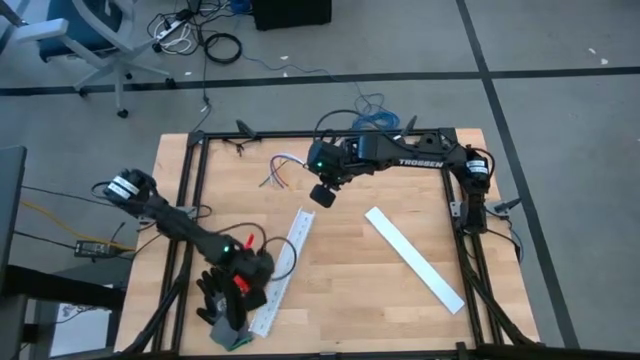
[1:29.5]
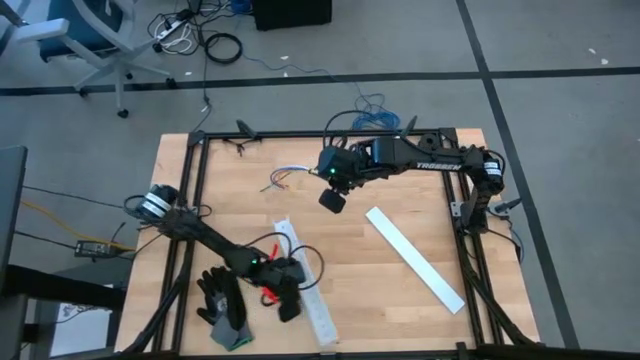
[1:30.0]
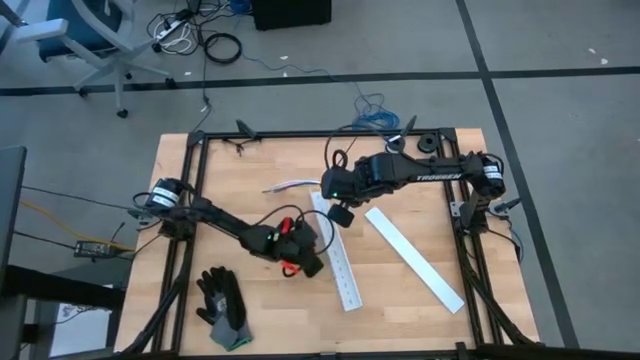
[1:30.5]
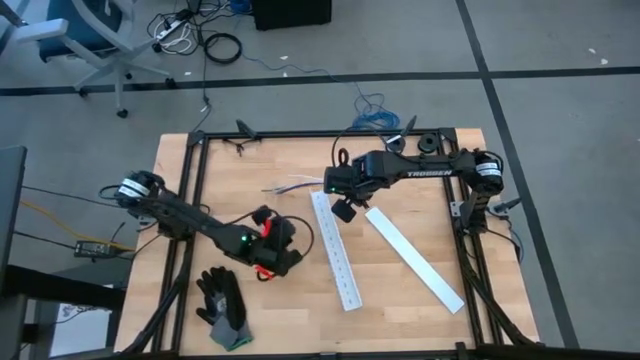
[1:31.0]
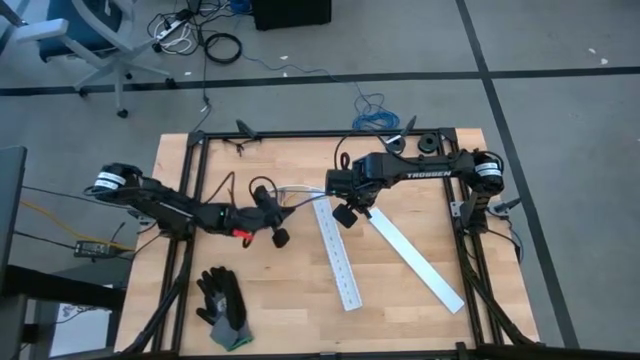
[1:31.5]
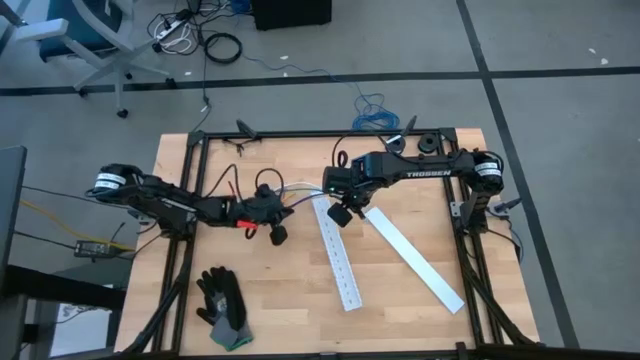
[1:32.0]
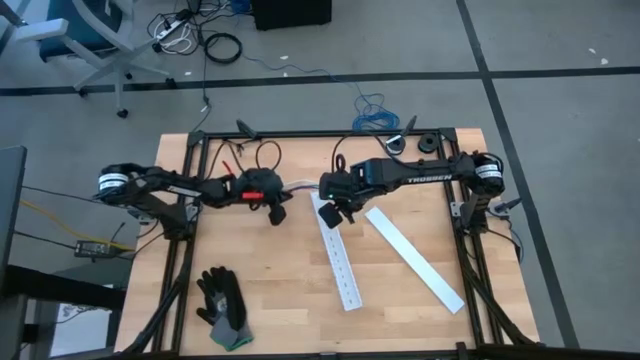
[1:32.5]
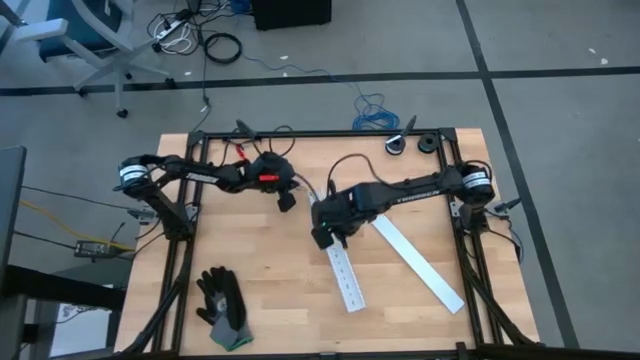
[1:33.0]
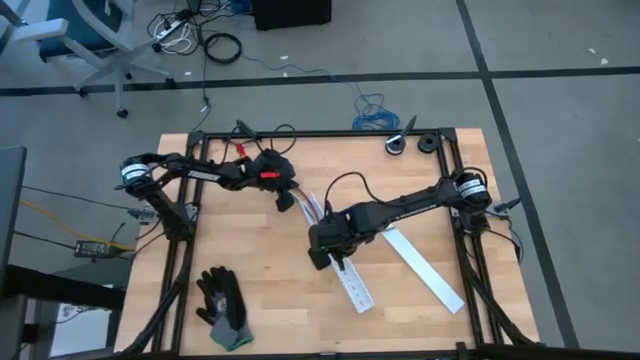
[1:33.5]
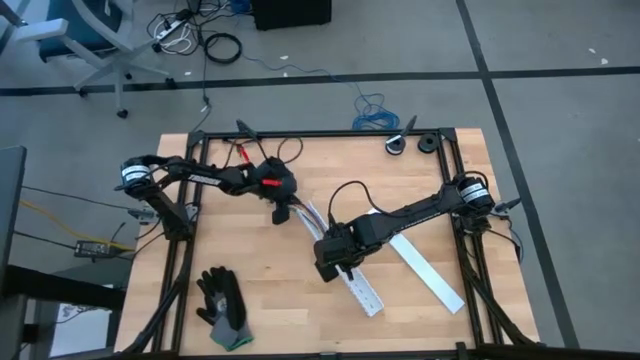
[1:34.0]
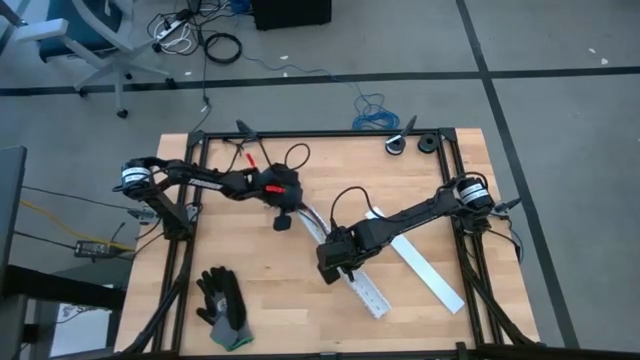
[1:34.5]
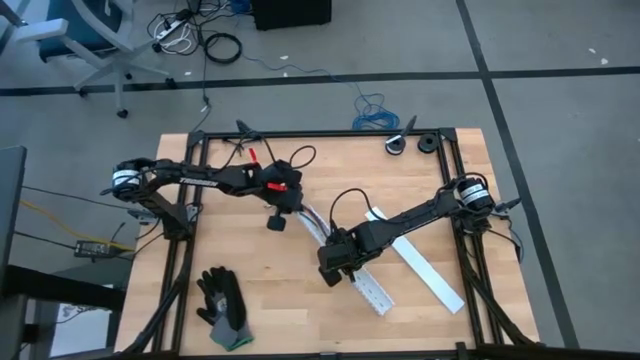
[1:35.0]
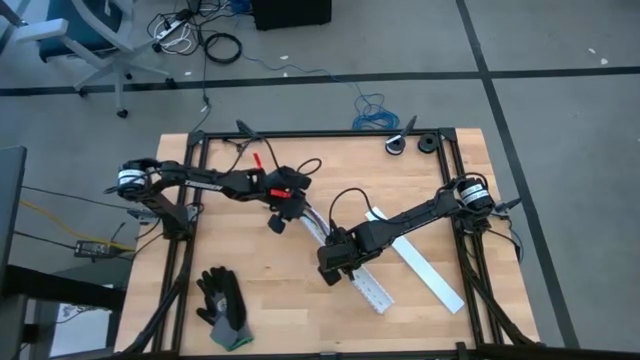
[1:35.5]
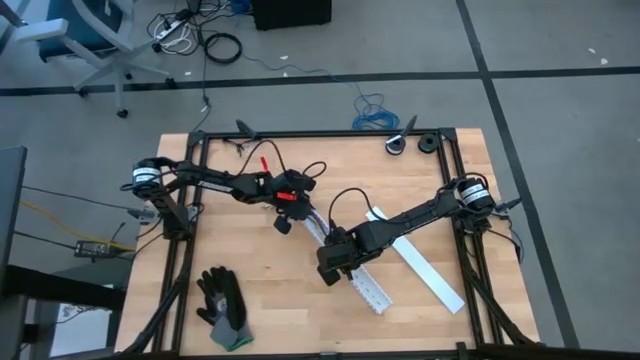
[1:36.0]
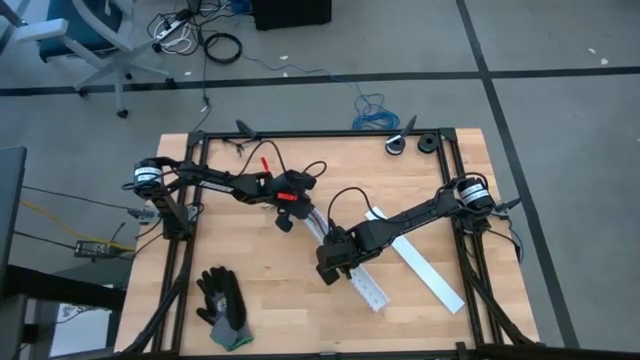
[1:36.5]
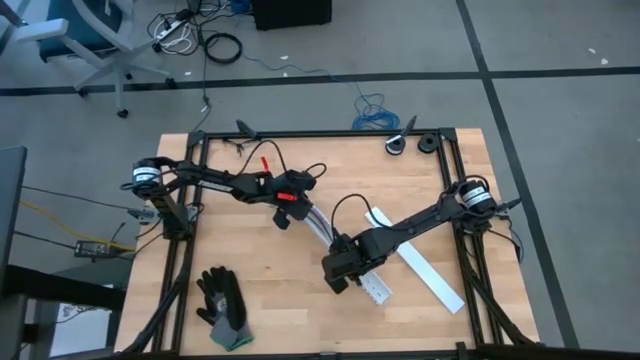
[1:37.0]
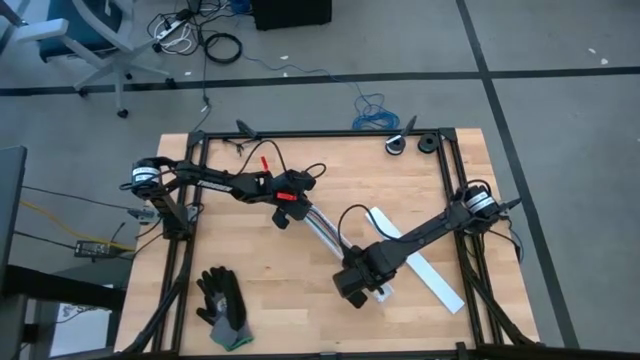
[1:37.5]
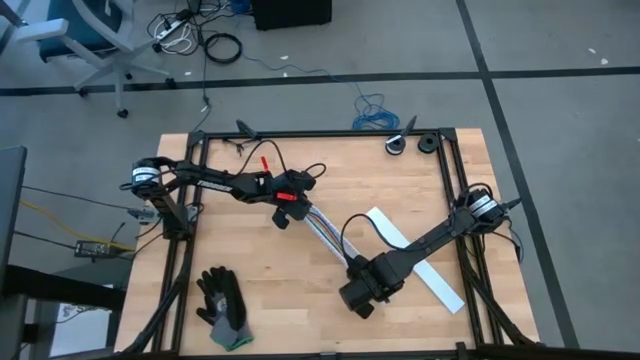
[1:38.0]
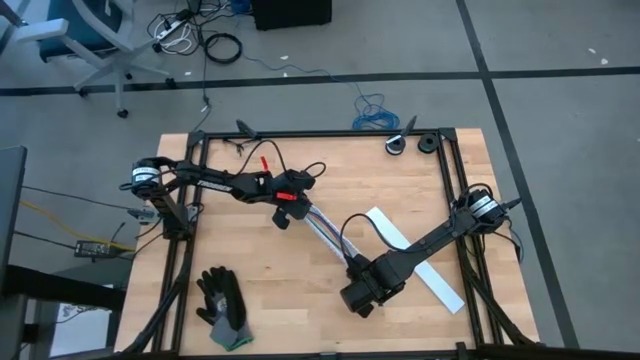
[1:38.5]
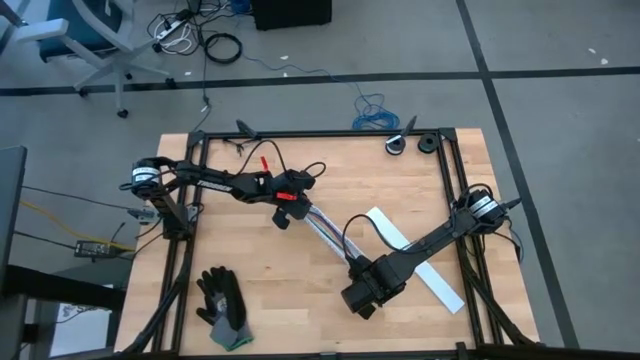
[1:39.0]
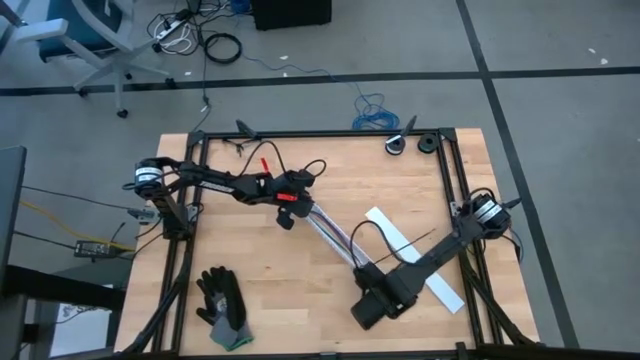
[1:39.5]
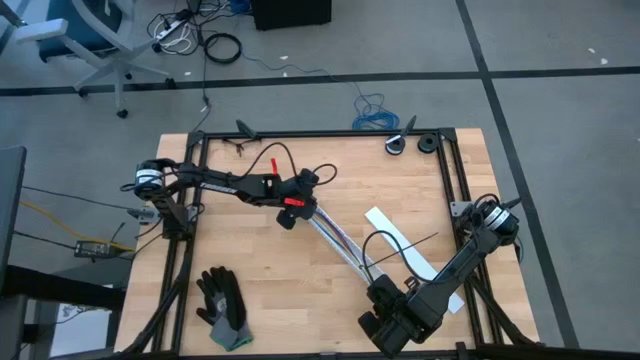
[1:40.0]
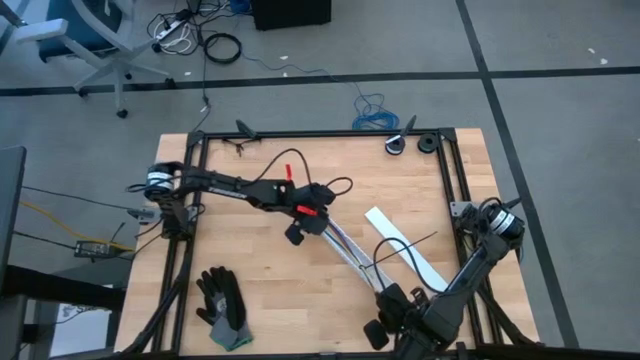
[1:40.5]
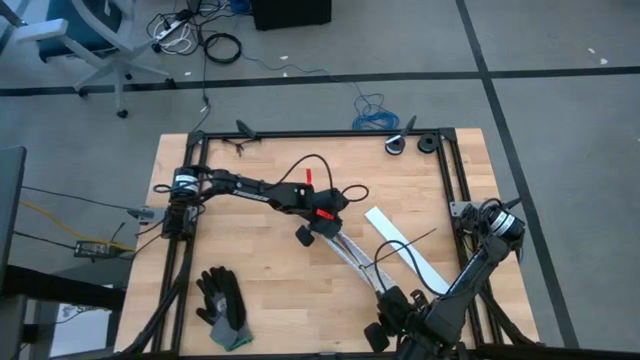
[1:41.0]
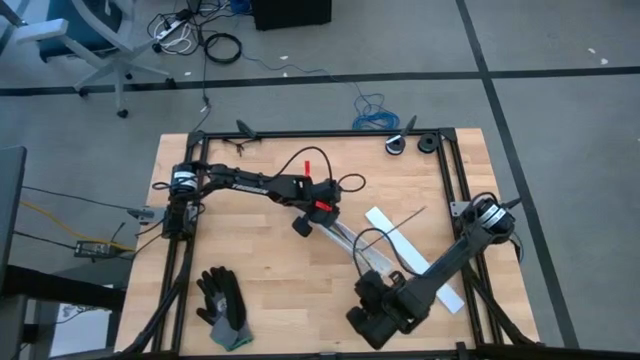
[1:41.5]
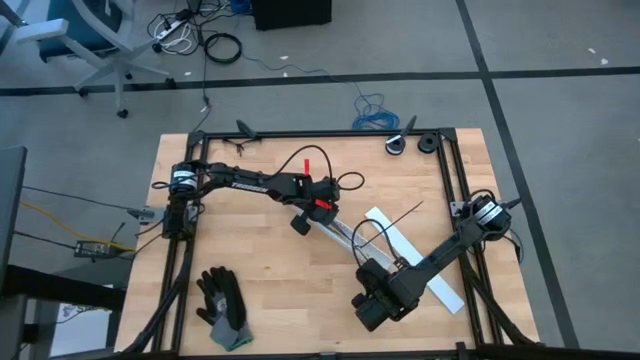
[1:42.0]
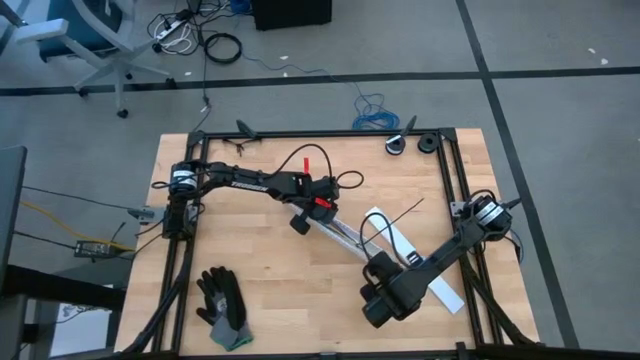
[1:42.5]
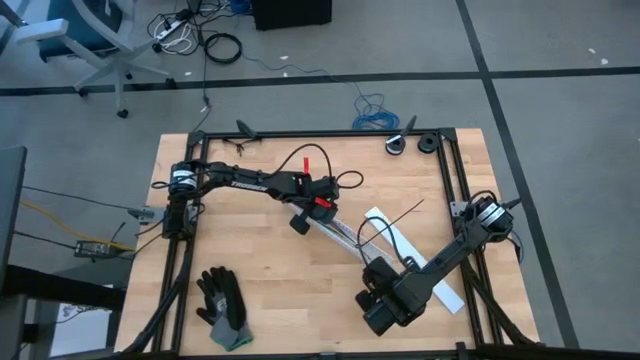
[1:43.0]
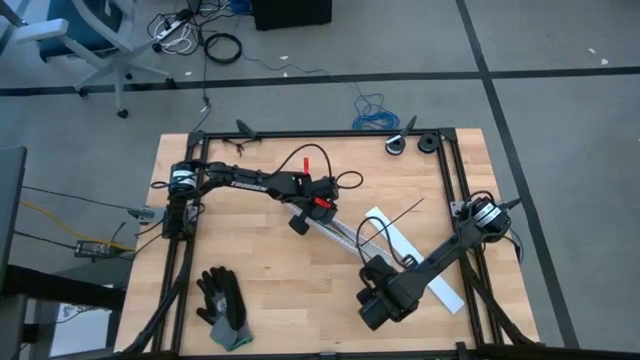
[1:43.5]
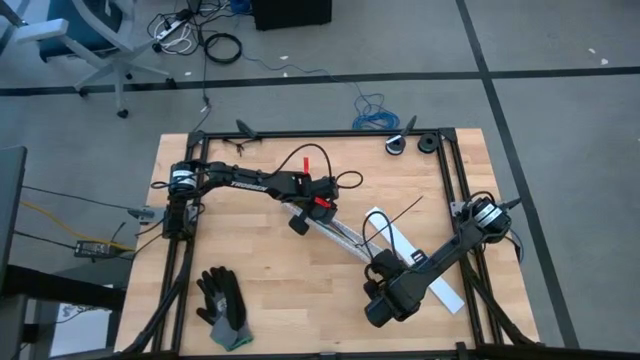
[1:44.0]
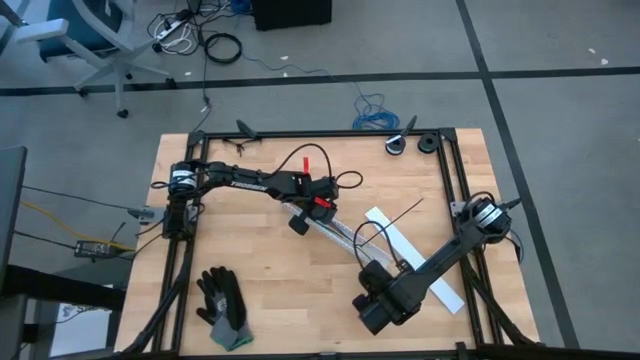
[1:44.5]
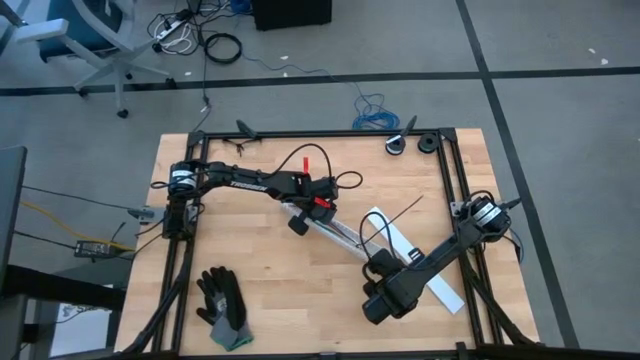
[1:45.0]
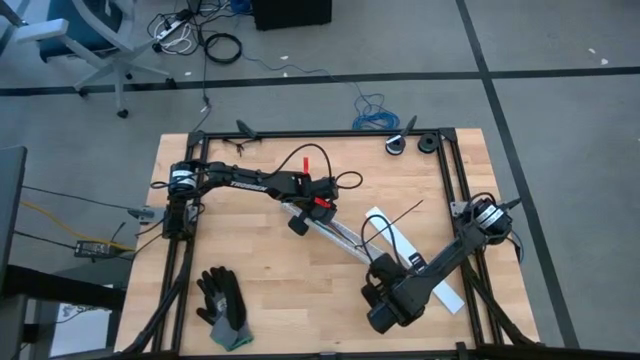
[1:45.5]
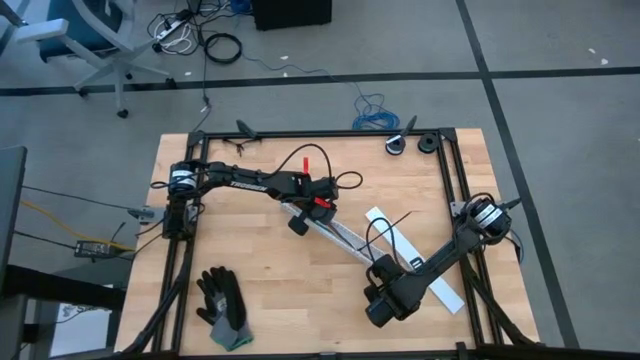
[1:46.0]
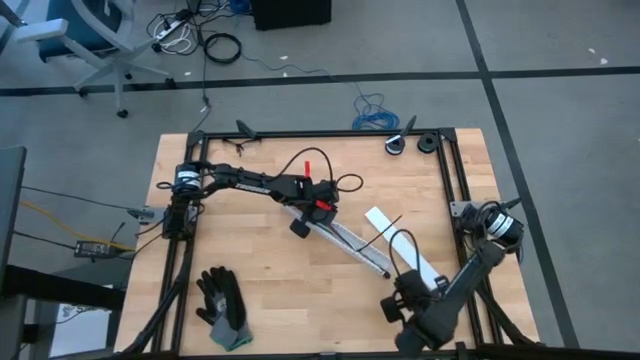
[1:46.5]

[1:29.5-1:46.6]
Task: Ziptie cables
Put the ziptied cable wires into the white cable duct

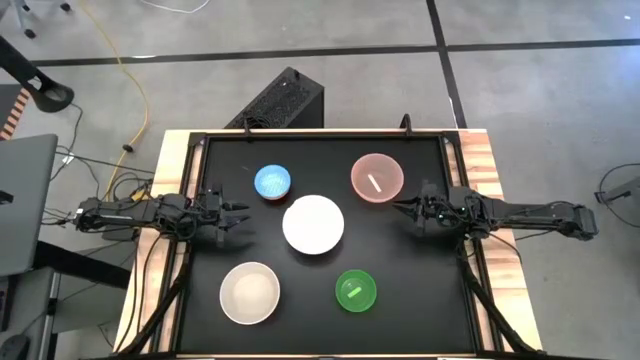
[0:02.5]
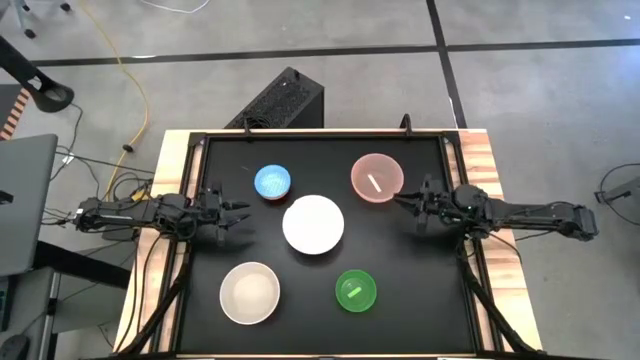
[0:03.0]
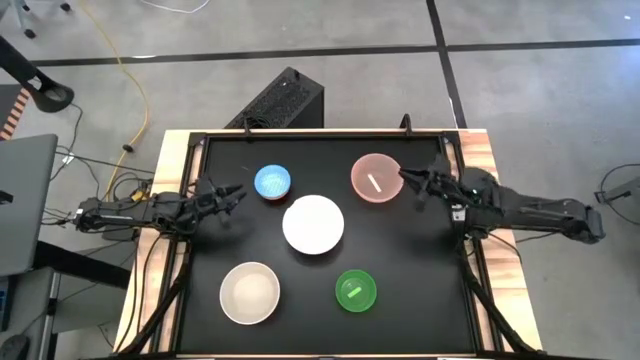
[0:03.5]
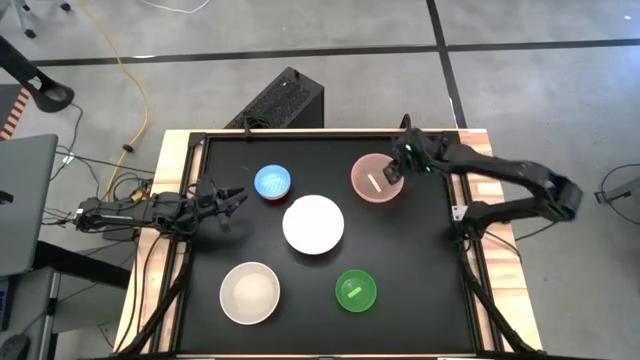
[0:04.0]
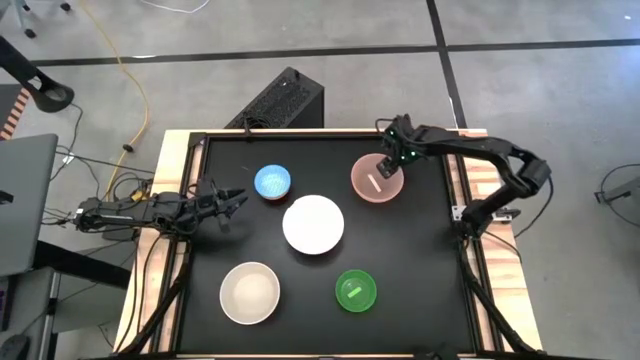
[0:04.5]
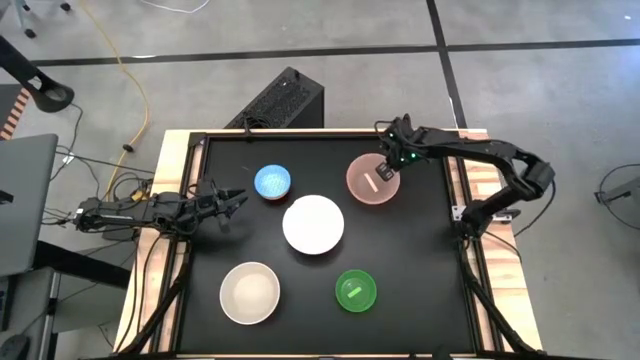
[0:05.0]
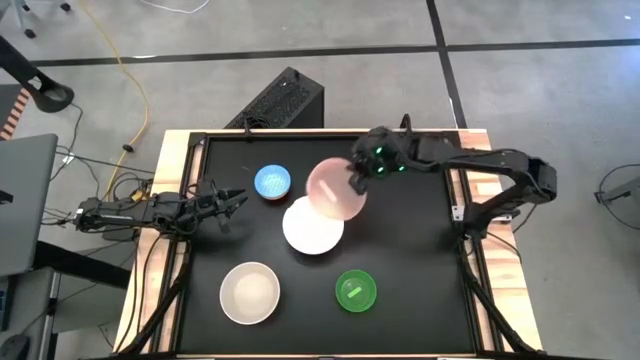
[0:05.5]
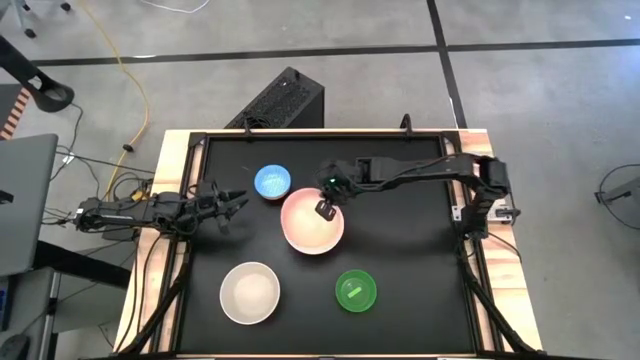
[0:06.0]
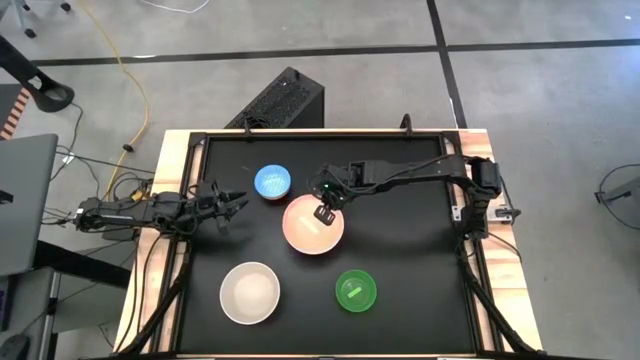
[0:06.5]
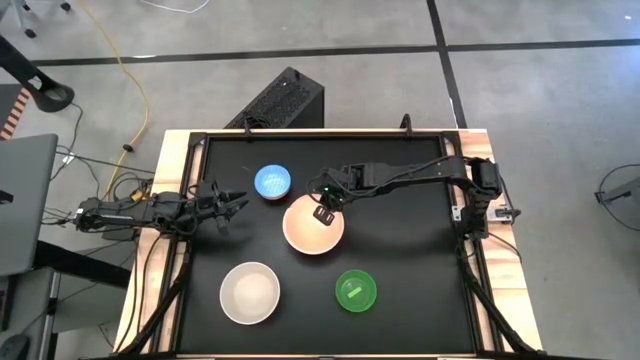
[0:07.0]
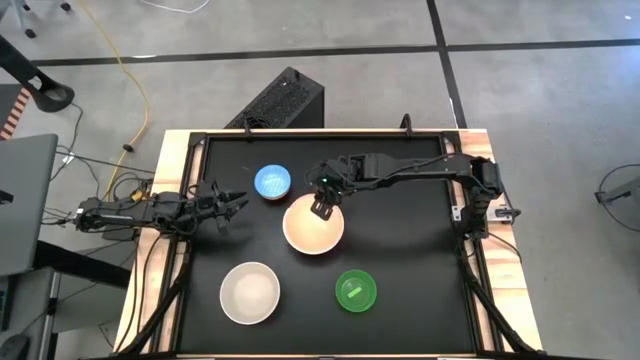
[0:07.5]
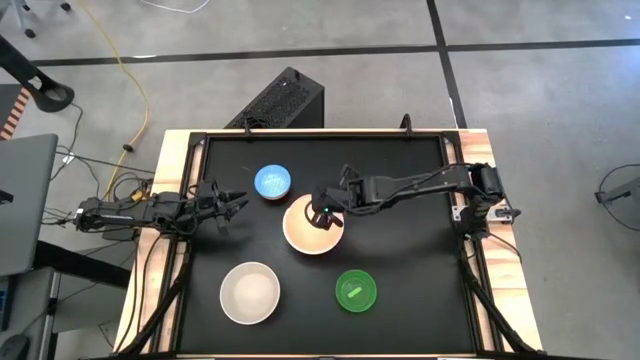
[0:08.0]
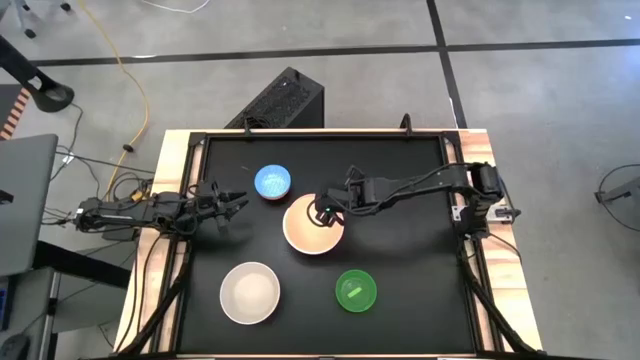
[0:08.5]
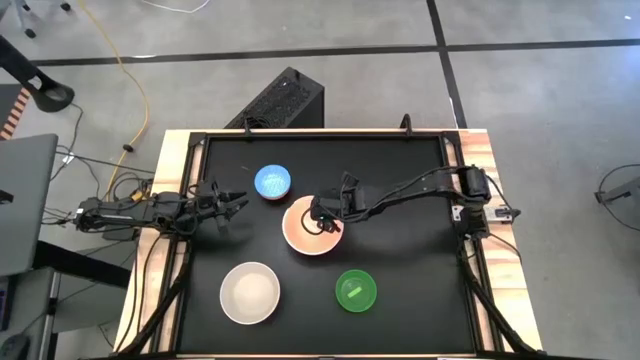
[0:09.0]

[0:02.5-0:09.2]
Task: Nest bowls inside each other by size order
Stack the light orange bowl on the top of the white bowl
